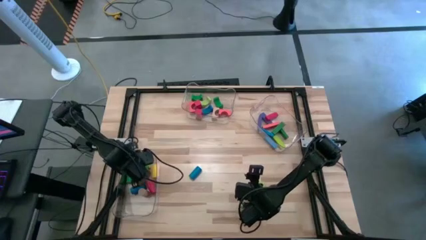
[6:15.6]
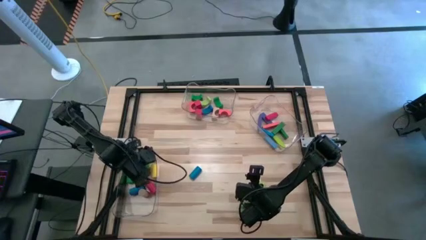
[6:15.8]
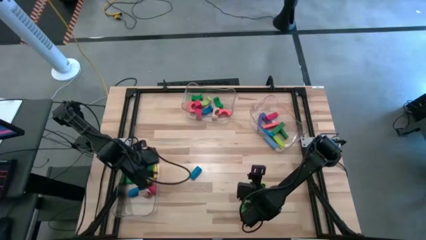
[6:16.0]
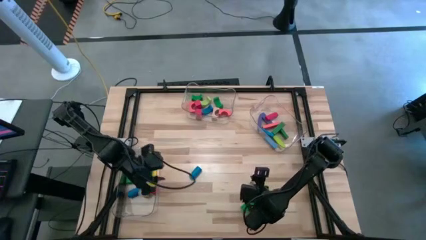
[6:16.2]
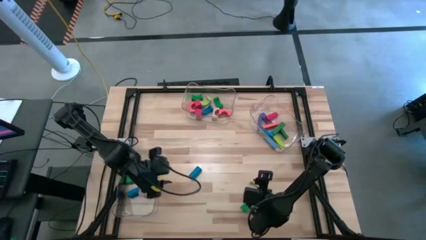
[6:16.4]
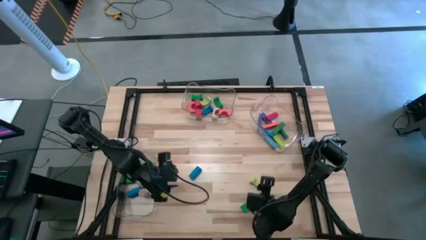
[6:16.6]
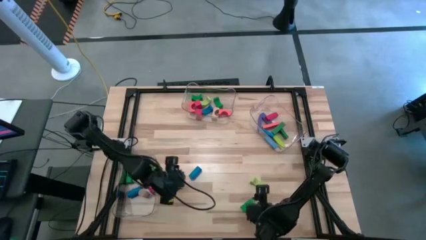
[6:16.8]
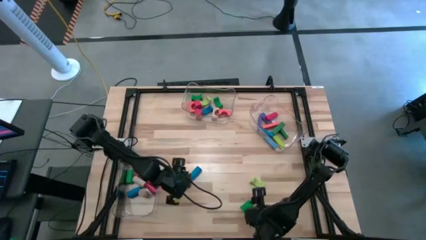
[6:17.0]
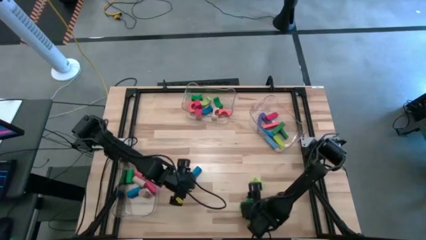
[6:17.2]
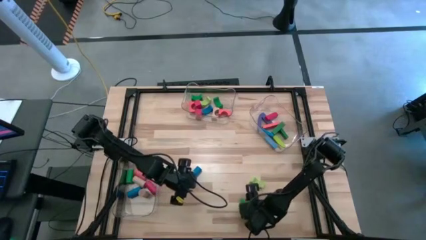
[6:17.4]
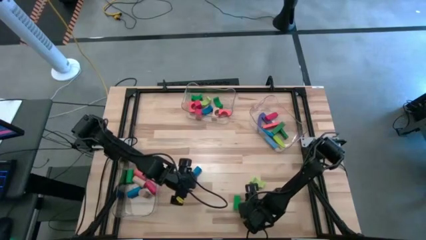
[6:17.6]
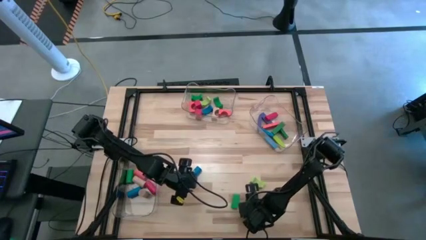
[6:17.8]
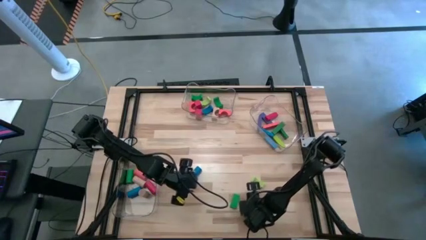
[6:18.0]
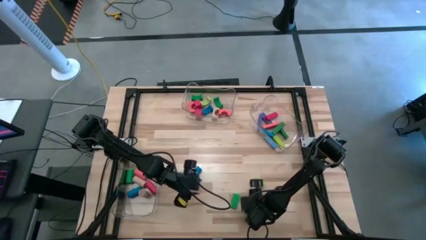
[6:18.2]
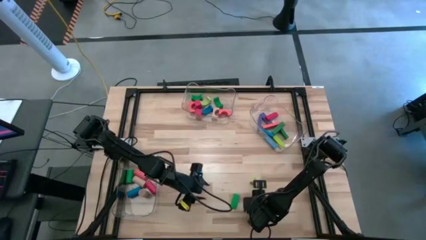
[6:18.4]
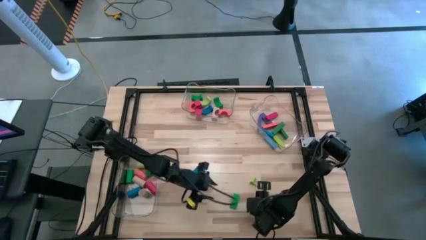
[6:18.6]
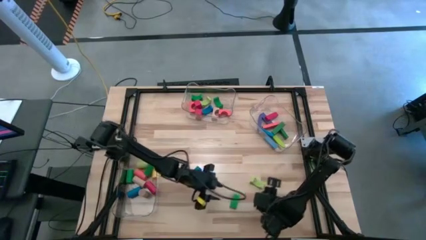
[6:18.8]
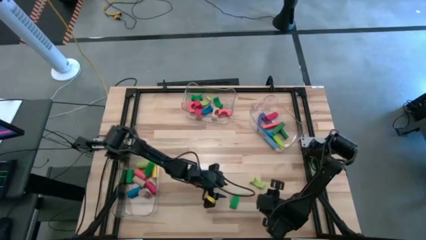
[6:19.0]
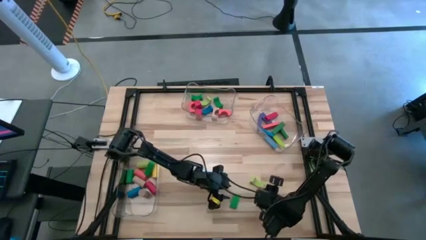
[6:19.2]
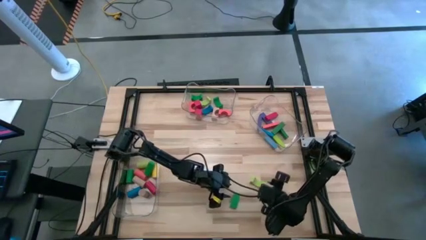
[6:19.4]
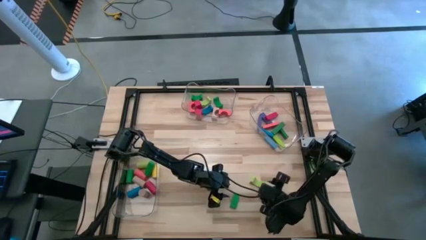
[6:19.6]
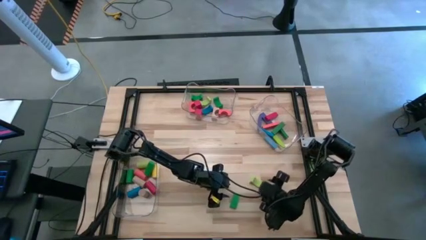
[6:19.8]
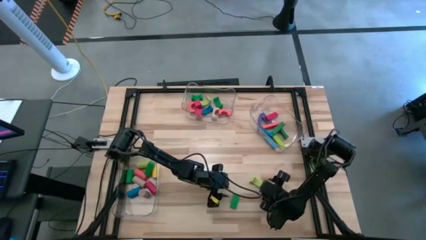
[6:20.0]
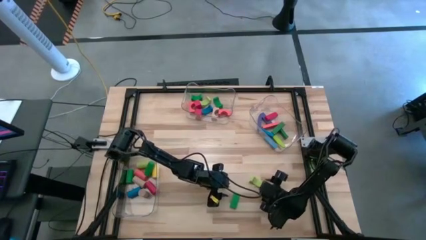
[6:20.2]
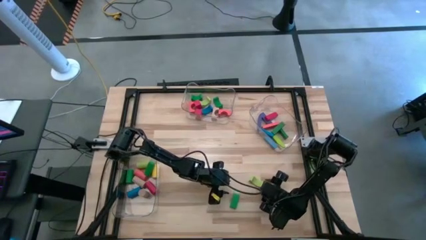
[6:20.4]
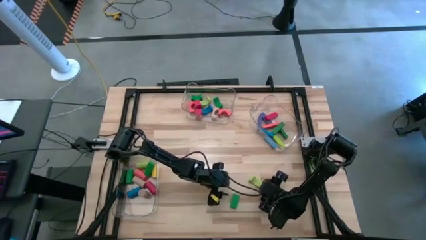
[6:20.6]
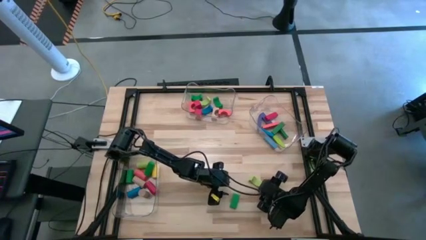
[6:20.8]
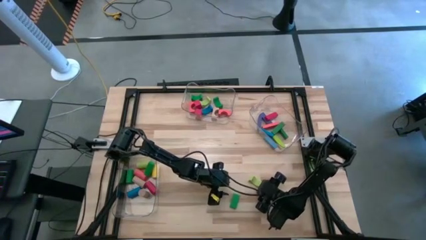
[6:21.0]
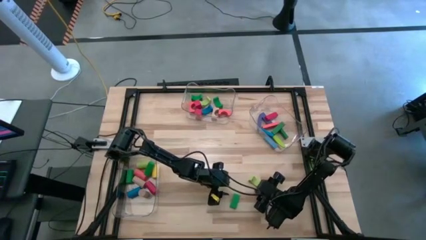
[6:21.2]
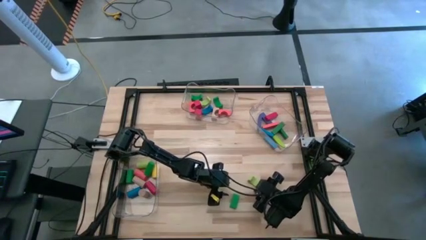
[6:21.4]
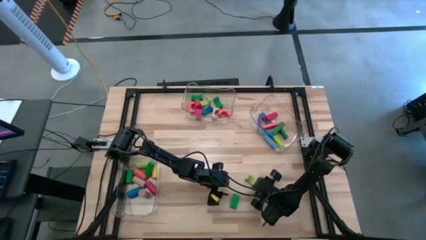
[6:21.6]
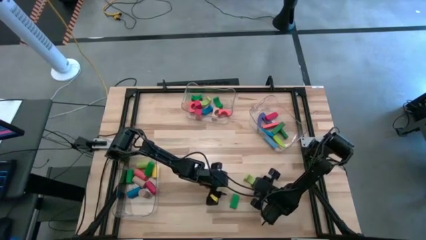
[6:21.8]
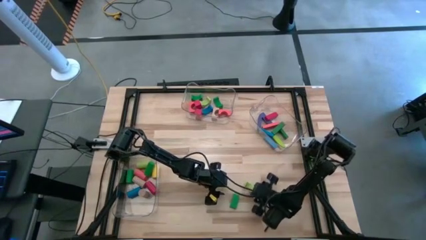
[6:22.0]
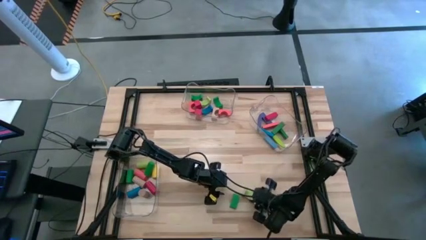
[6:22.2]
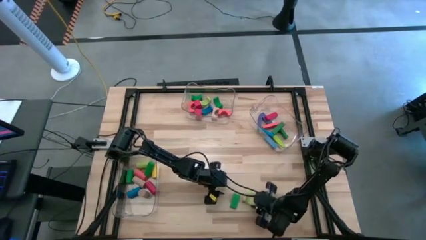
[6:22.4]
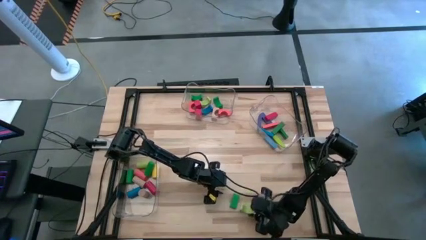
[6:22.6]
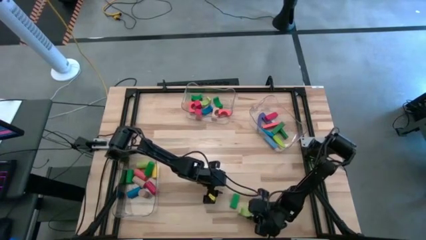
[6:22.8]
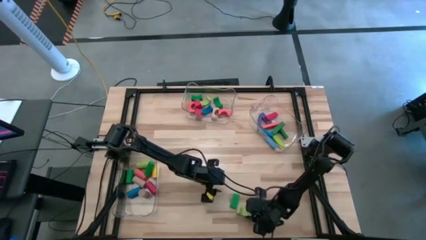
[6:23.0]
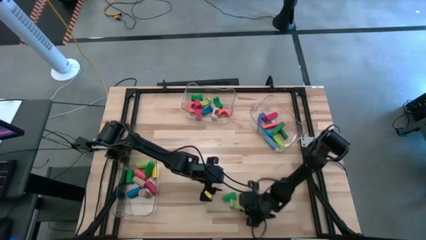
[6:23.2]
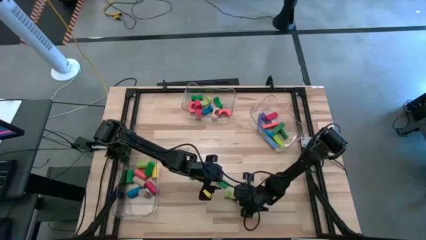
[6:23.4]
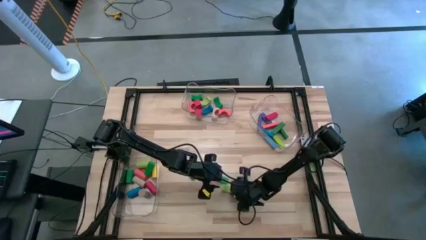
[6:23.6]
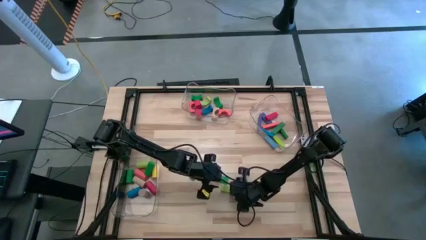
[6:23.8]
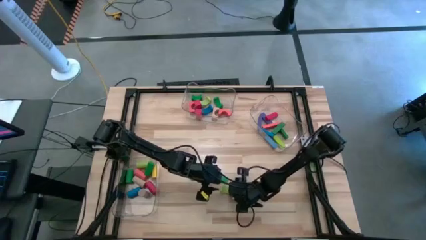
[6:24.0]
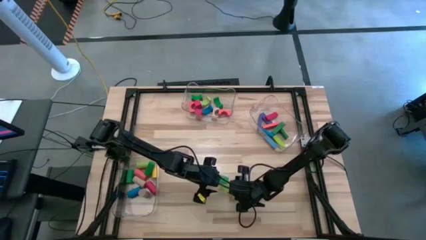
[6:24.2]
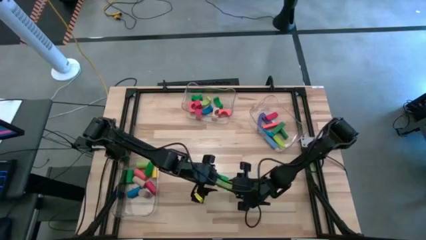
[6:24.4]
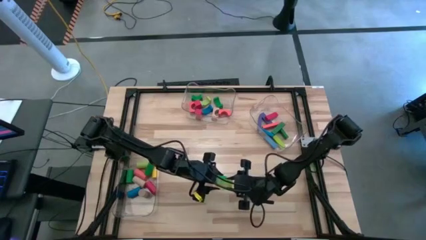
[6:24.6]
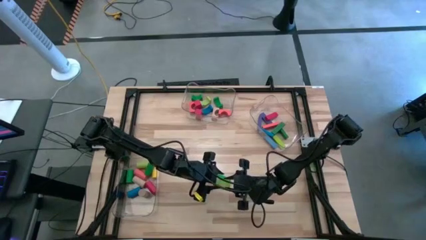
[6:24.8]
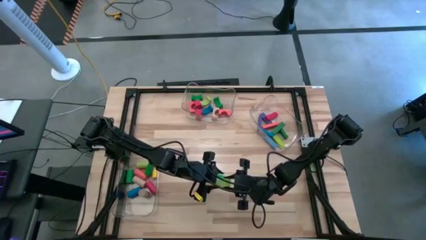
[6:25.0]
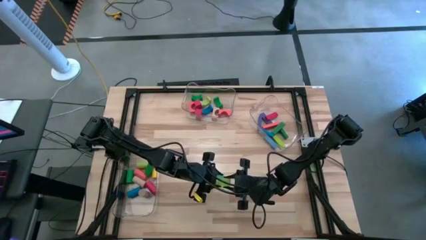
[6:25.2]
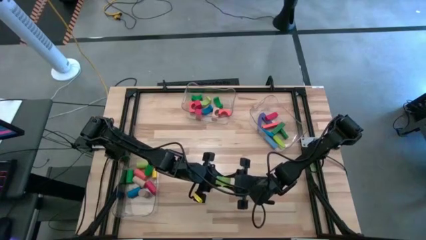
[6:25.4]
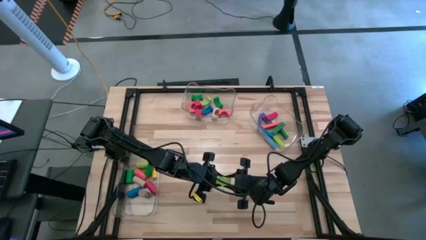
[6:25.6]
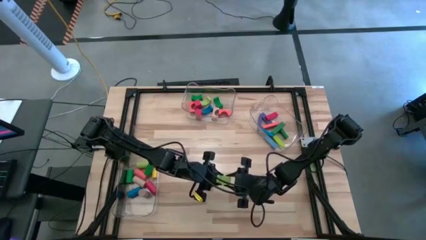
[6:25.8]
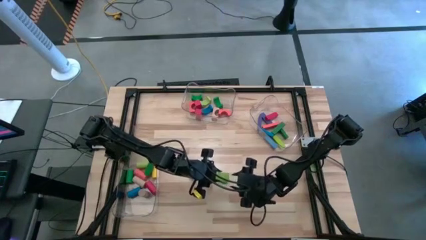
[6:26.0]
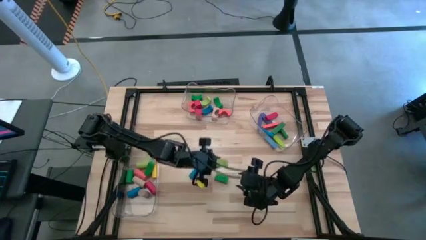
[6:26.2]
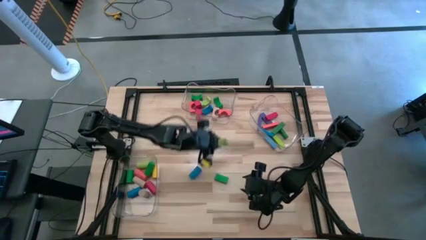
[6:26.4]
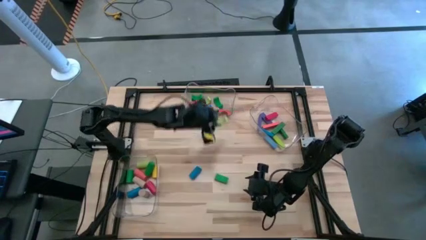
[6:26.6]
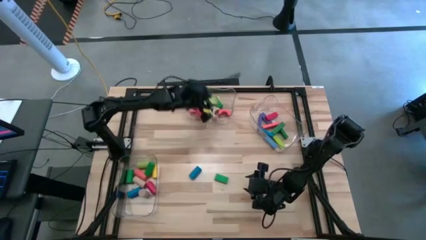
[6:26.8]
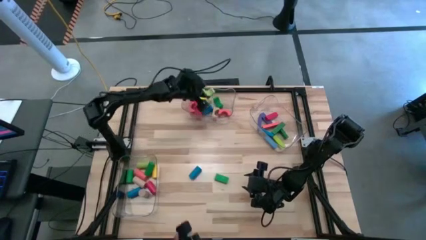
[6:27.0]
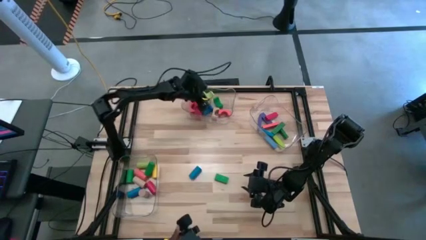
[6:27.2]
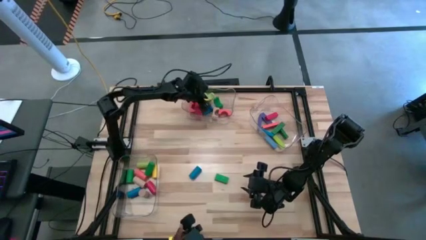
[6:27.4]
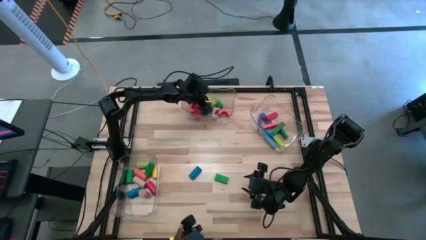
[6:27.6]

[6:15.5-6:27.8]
Task: Sort blocks by size
Put the light green arch block into the middle transparent bin
